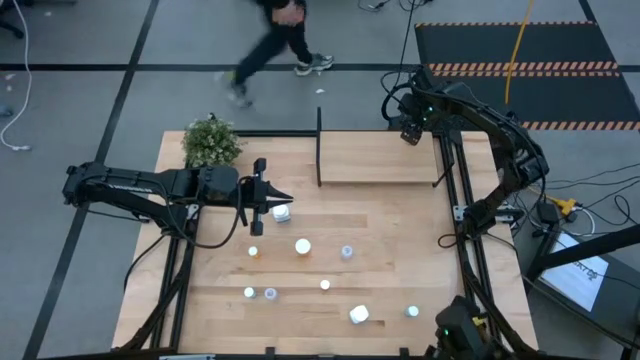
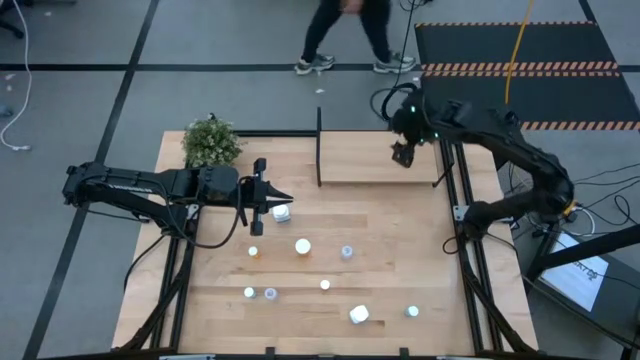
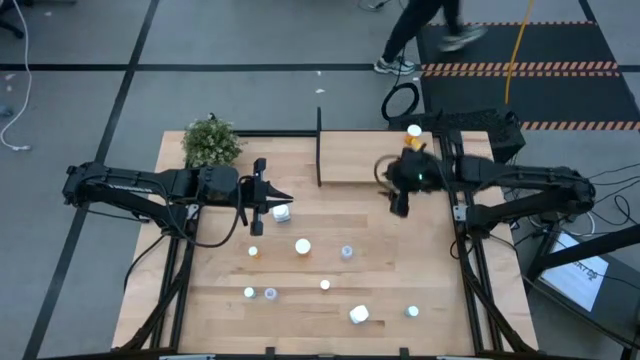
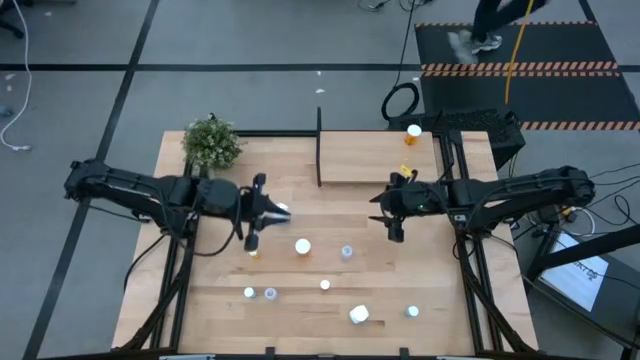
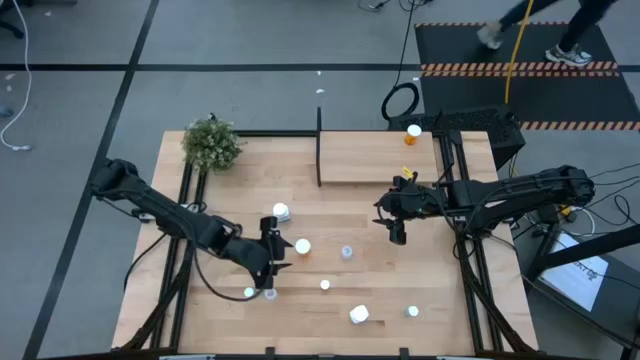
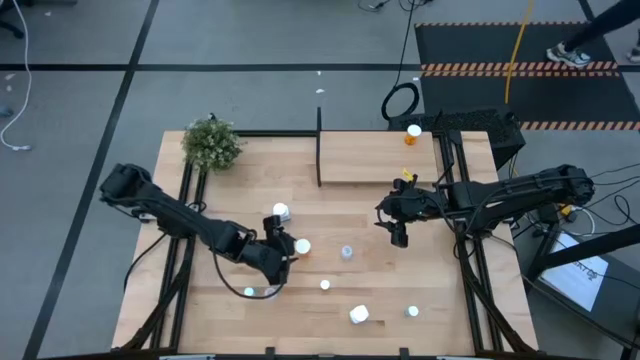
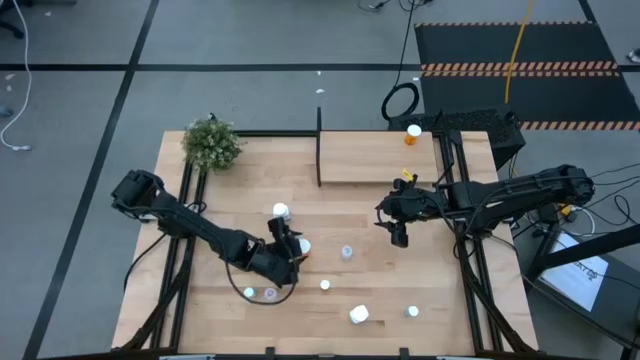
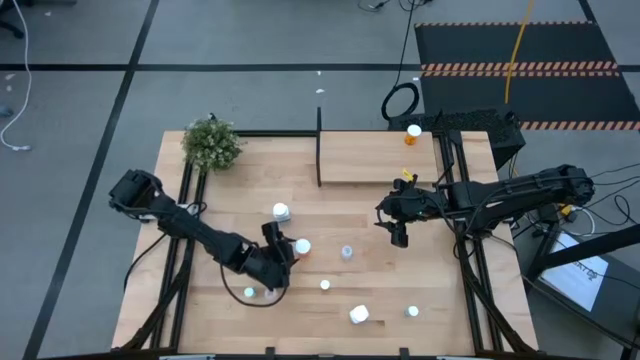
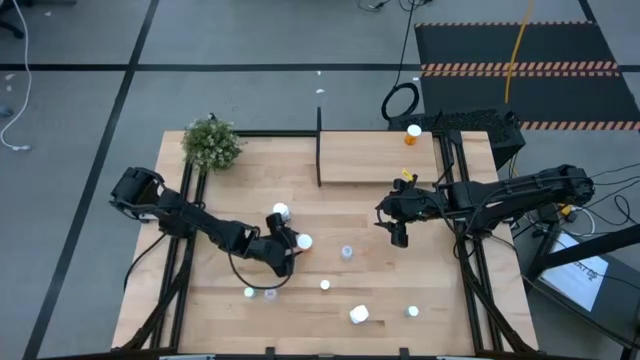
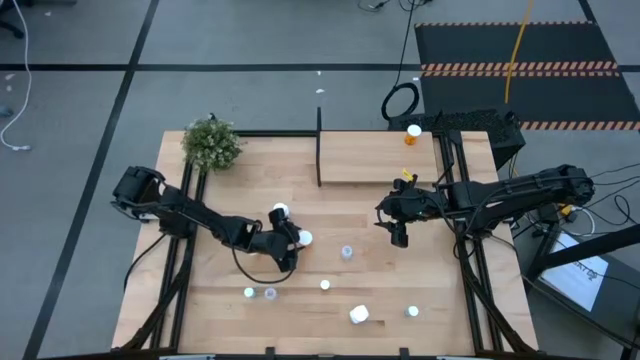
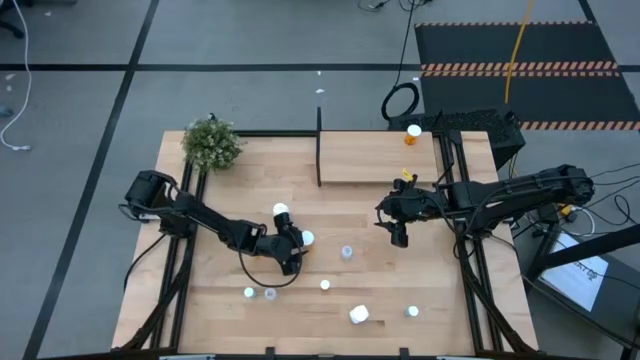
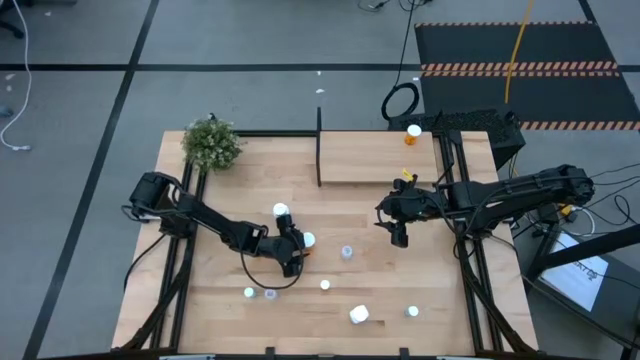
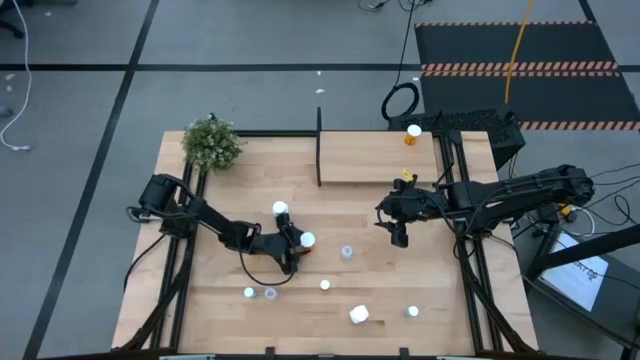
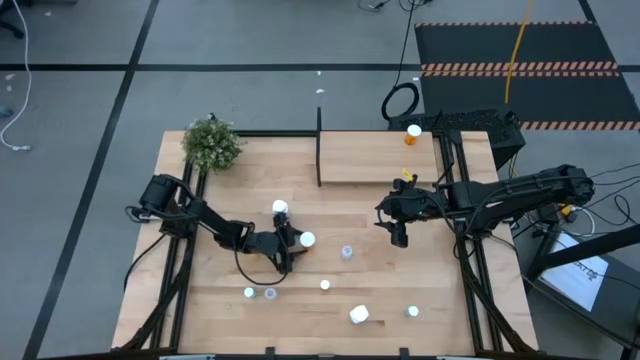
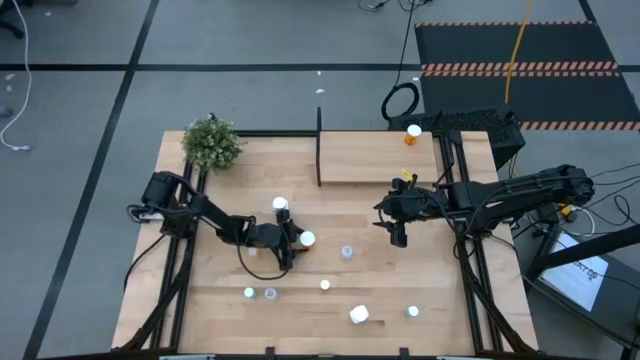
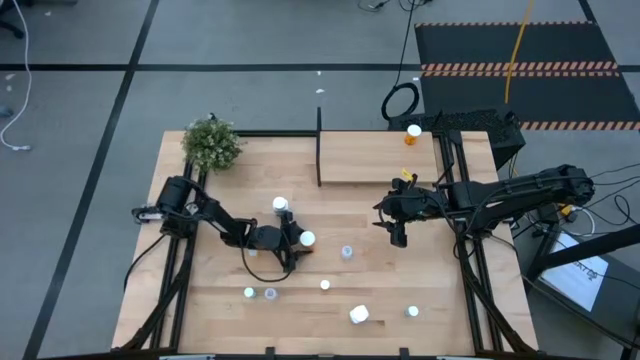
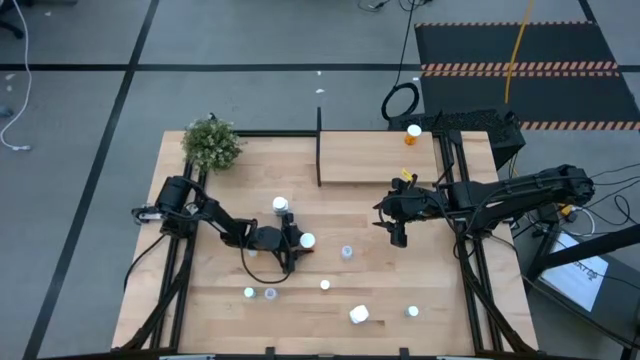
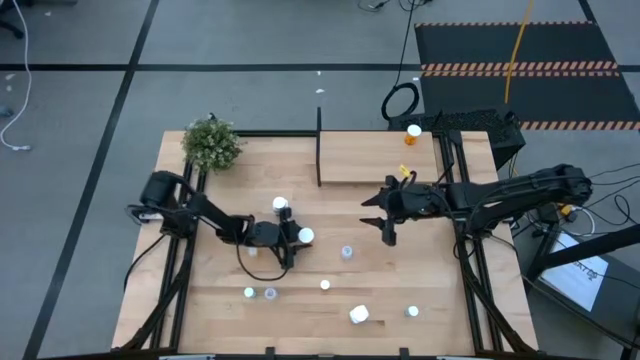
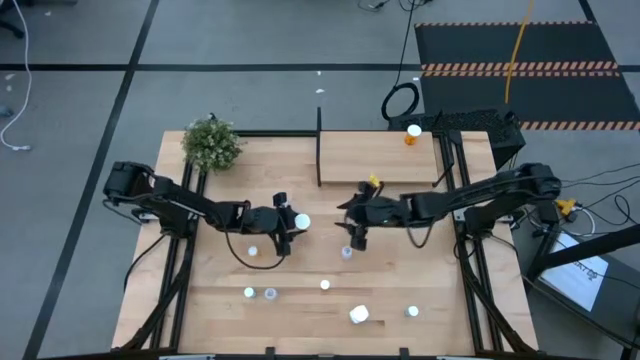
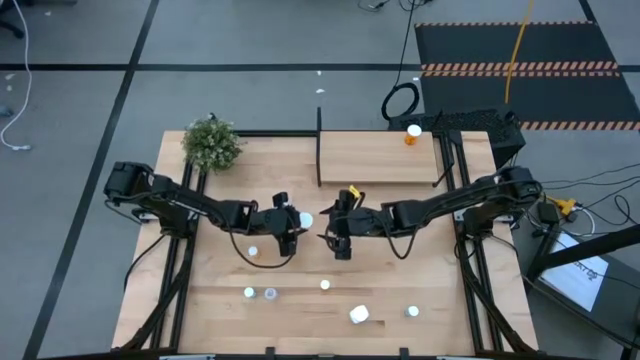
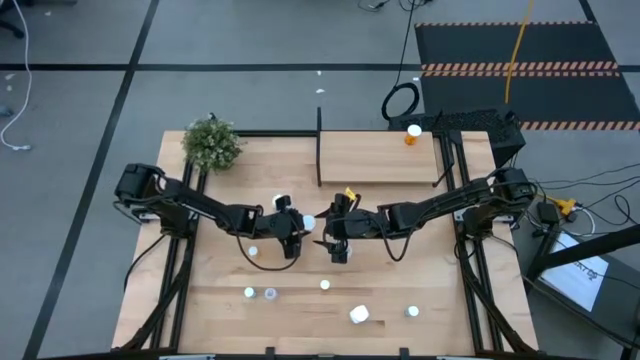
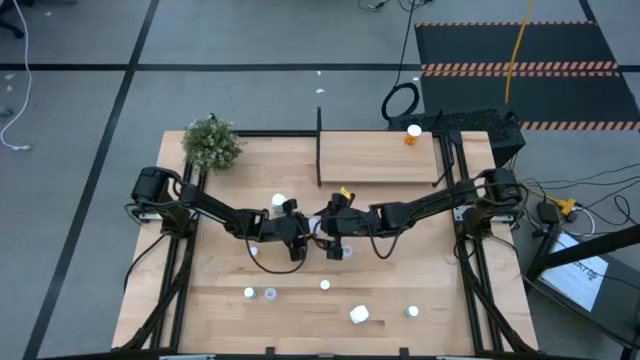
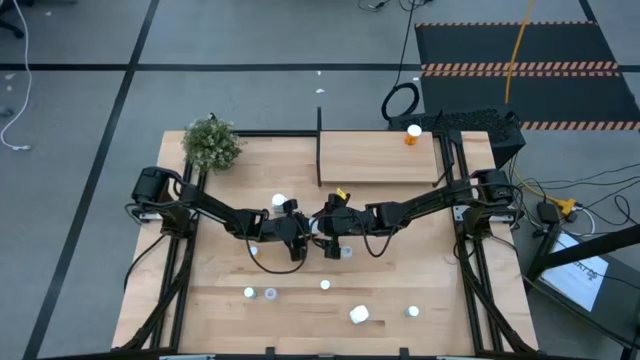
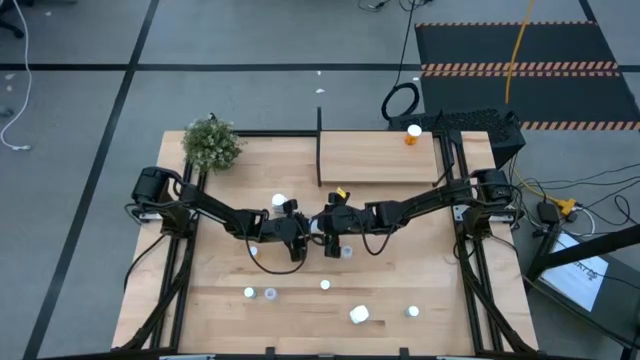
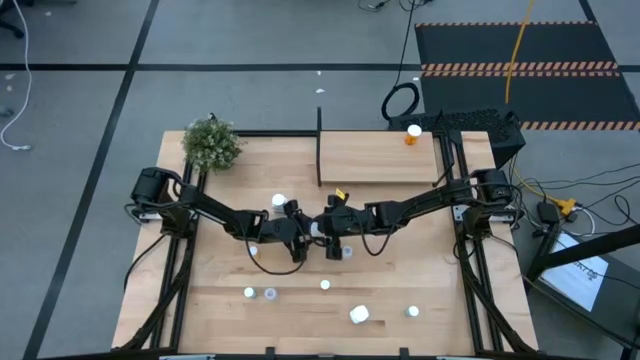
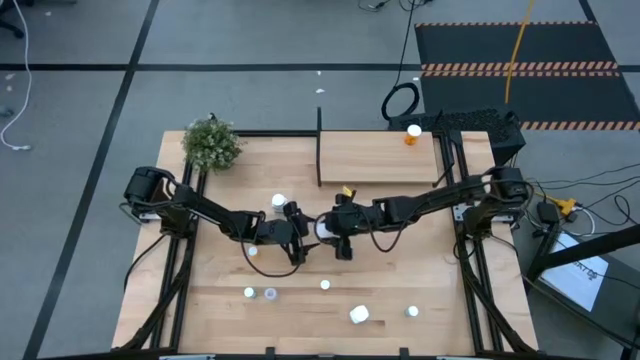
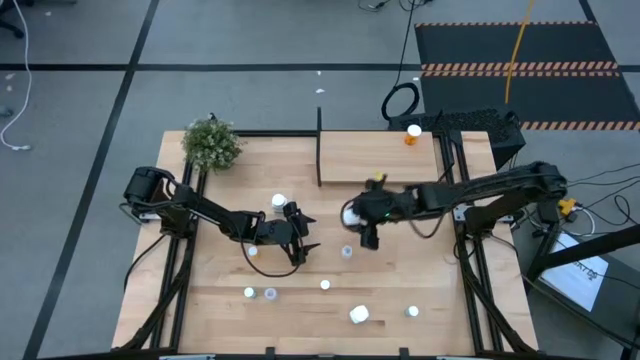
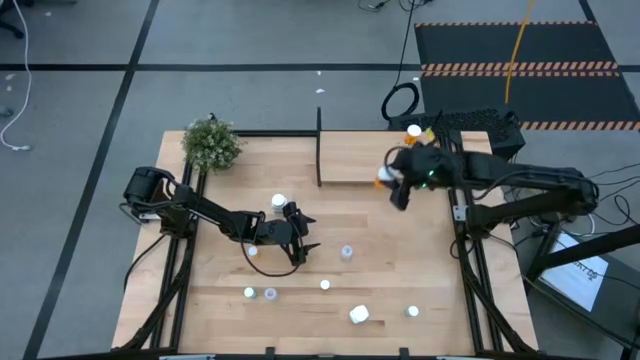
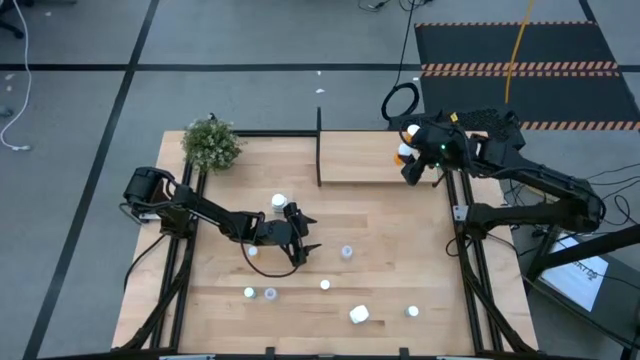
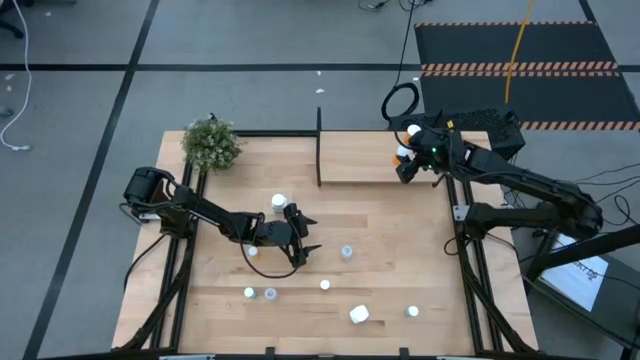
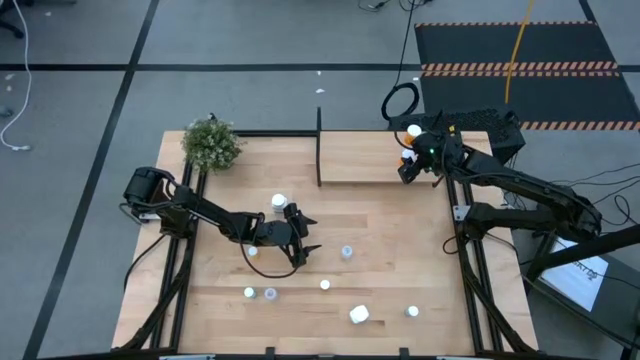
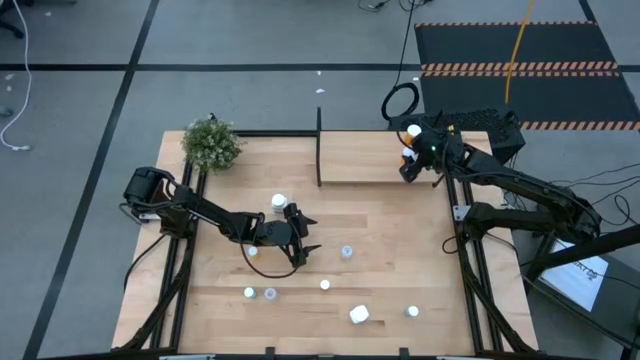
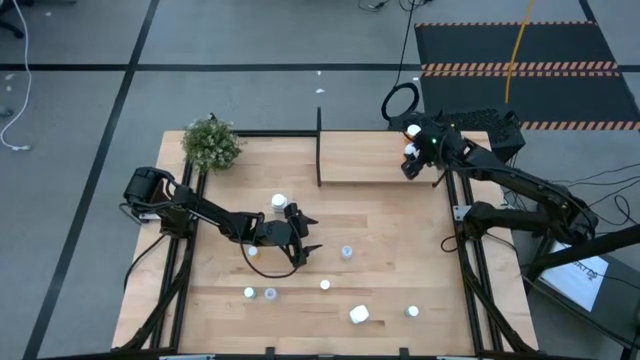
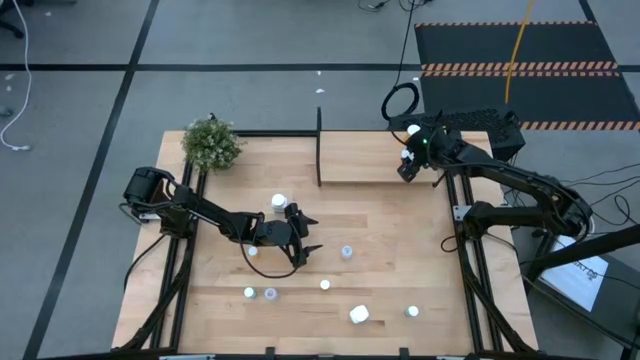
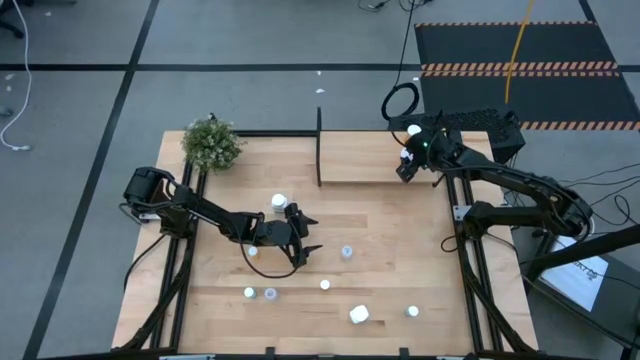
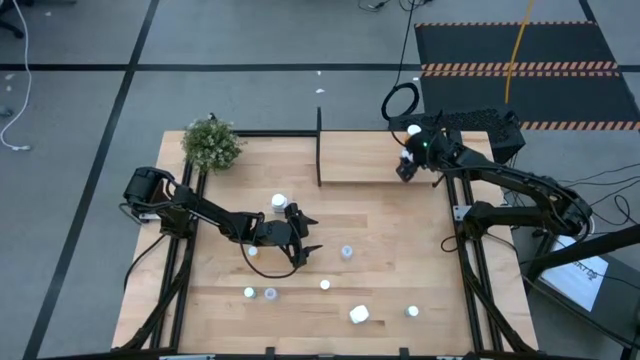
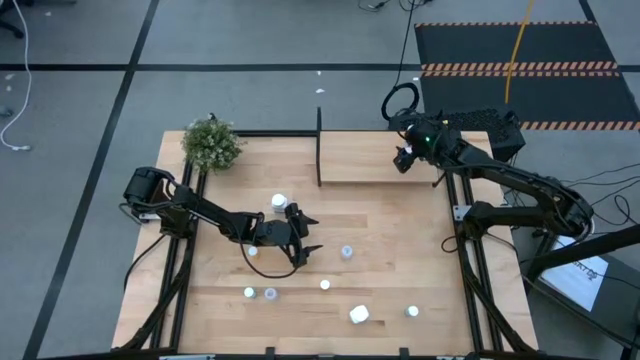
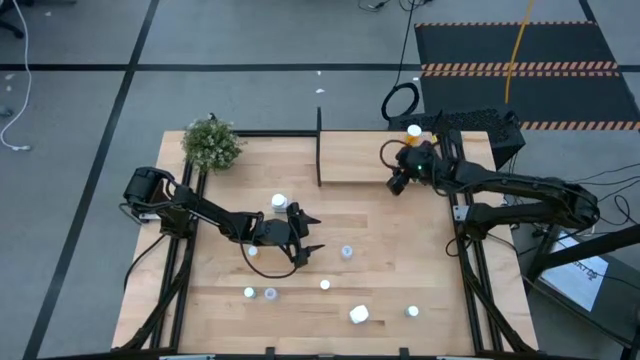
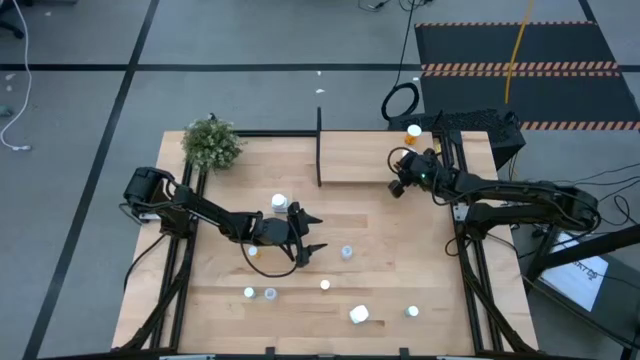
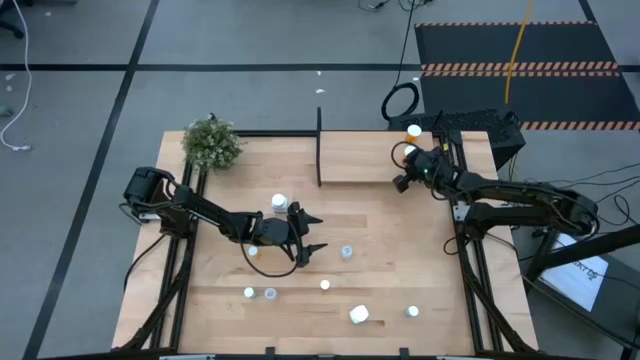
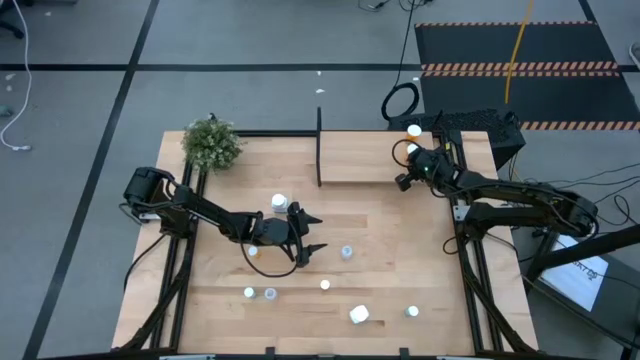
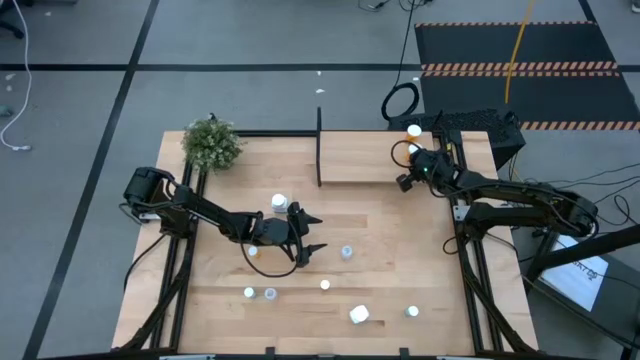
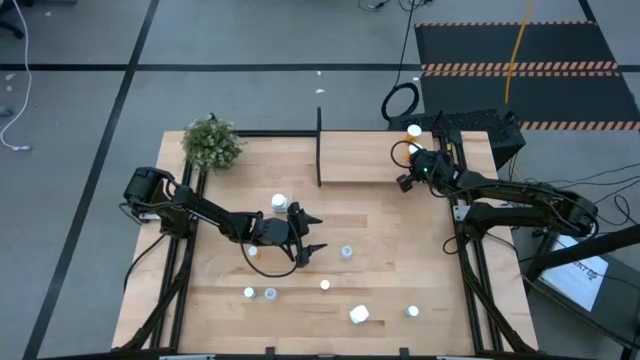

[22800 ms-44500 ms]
Task: Pick and place medicine bottles onto shelf by color
Put the large orange pill bottle on the shelf aligned with the other large orange pill bottle
